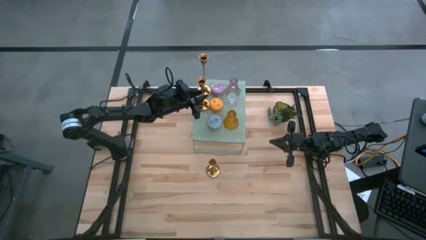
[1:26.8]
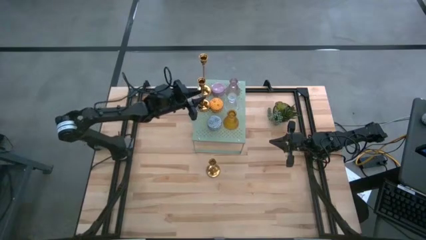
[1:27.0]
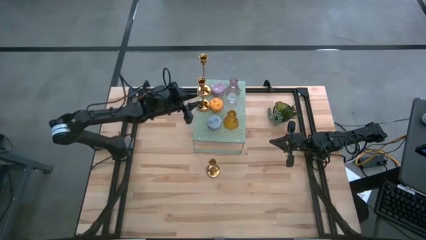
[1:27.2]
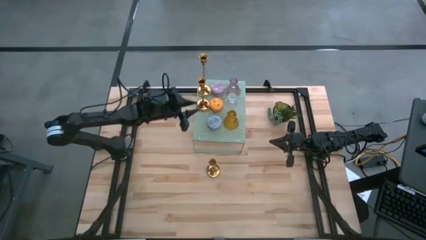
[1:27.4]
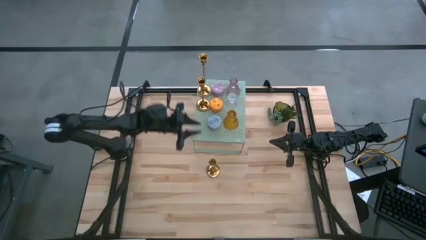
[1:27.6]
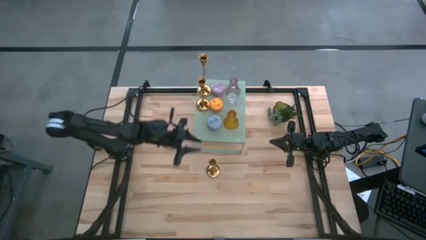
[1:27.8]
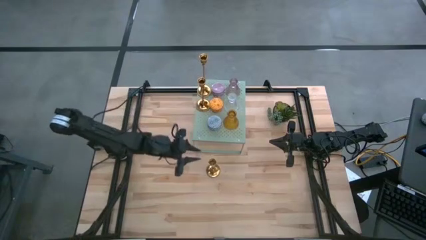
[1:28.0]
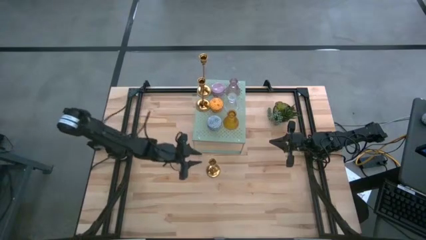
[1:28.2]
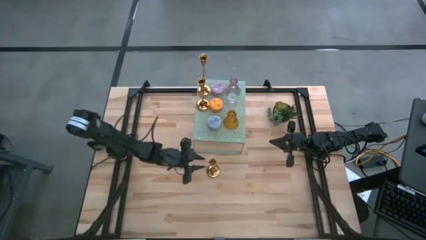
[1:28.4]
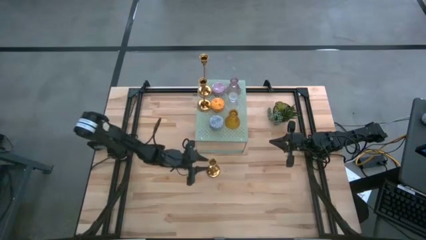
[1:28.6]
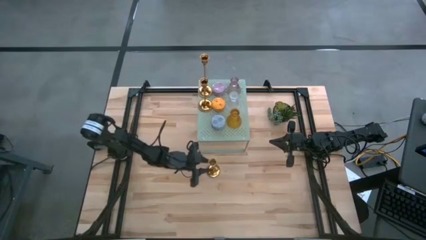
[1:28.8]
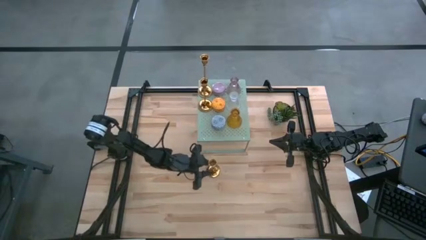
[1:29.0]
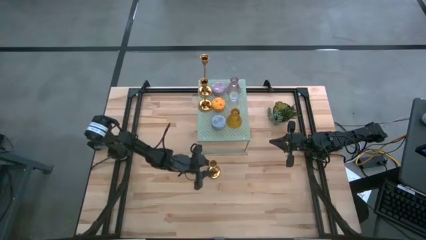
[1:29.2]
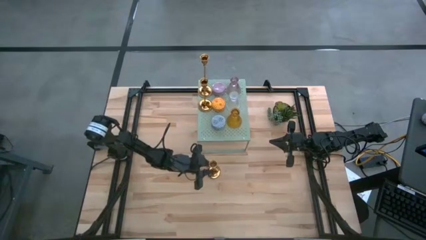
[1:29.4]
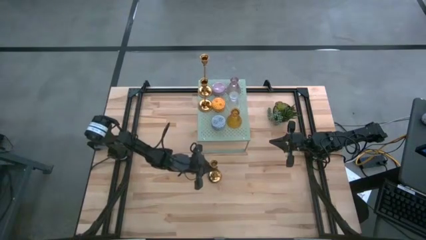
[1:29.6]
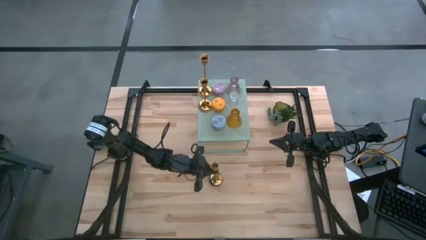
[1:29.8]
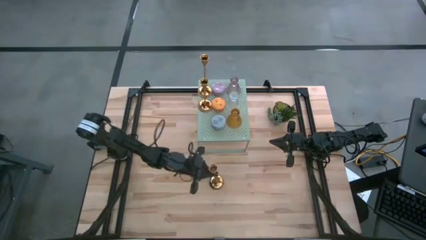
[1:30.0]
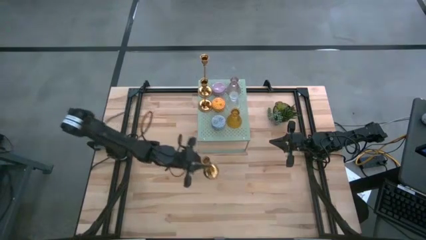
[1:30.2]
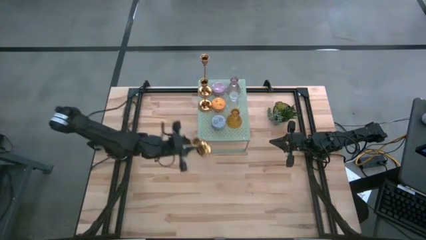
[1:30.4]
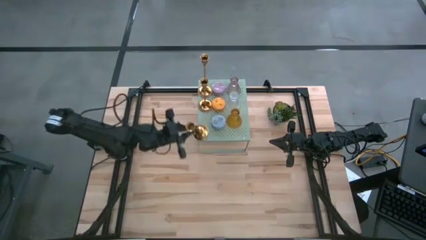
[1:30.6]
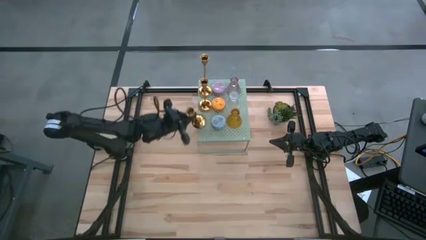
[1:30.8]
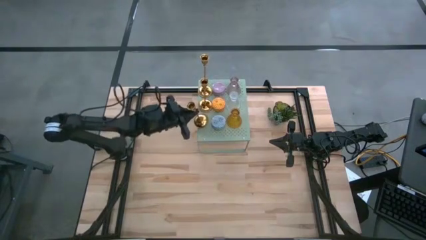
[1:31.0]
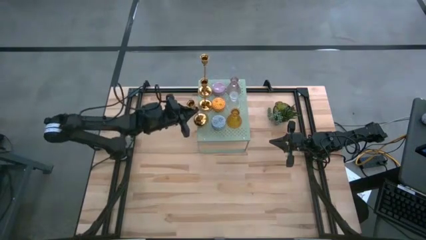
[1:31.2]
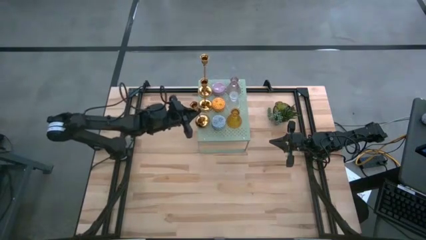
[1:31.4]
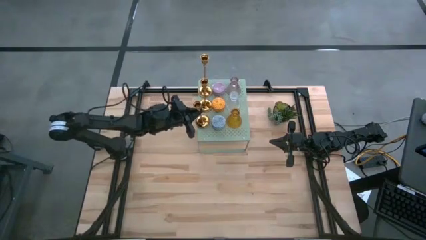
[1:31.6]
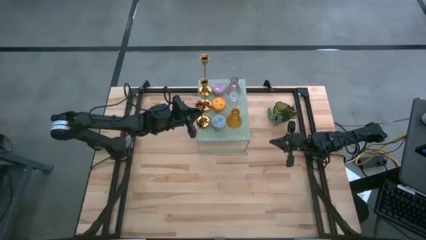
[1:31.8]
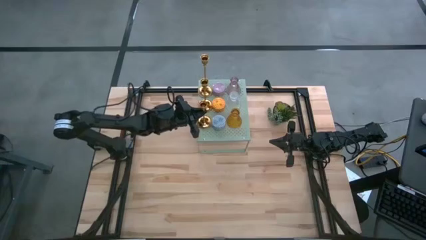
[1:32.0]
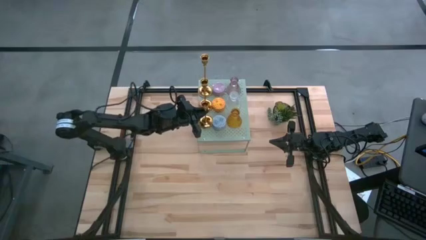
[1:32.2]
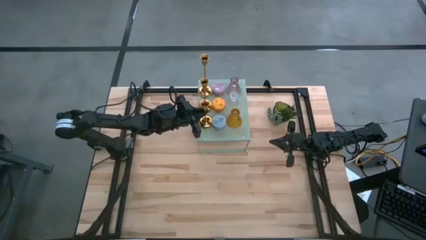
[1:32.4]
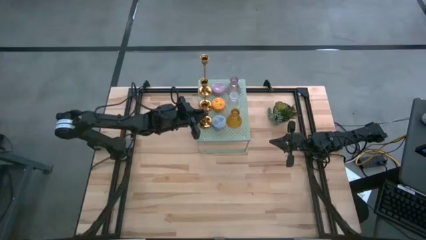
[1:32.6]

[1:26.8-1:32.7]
Task: Stock candles on shelf
Put the gold candle holder and aligned it with the other gold candle holder on the shelf

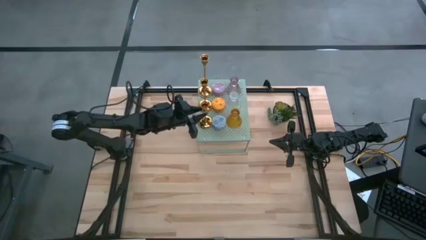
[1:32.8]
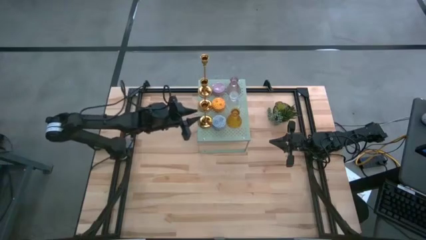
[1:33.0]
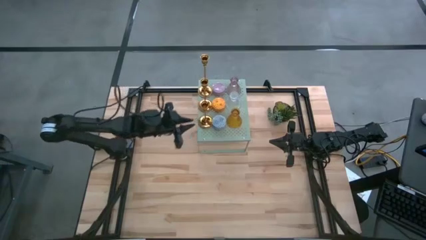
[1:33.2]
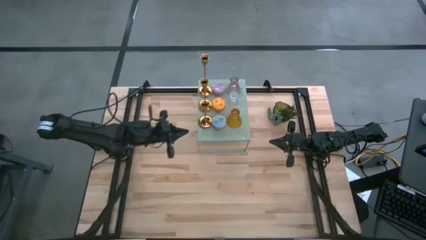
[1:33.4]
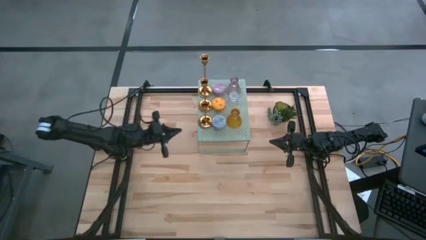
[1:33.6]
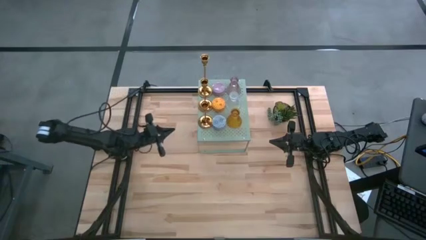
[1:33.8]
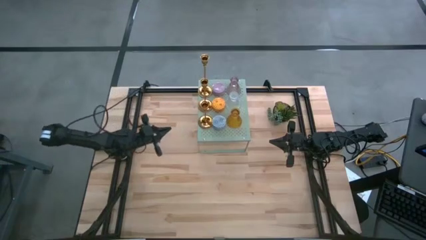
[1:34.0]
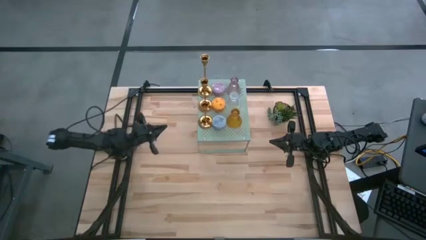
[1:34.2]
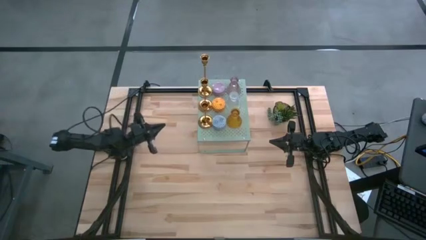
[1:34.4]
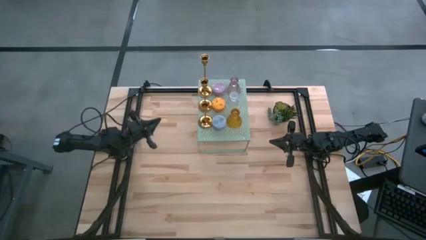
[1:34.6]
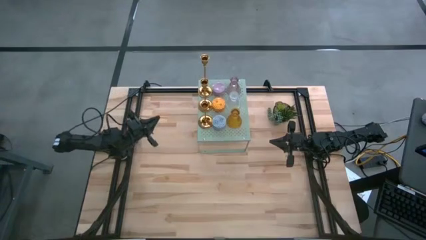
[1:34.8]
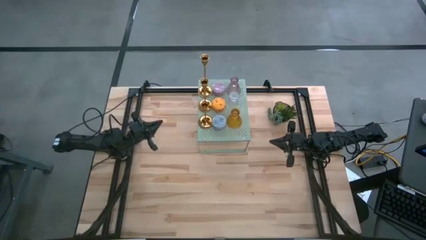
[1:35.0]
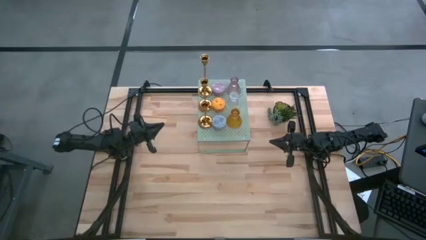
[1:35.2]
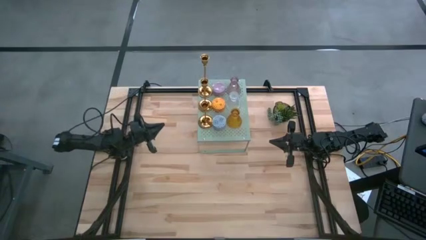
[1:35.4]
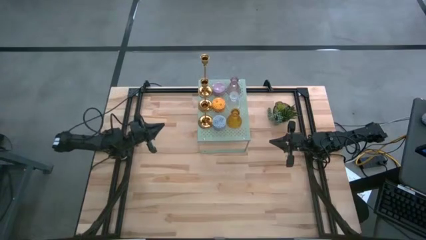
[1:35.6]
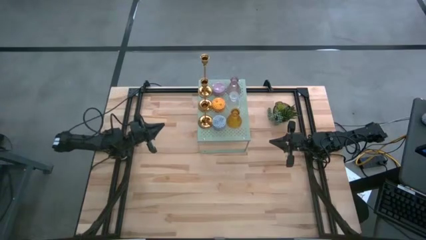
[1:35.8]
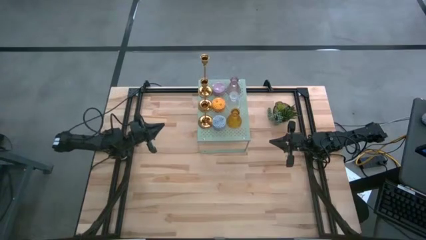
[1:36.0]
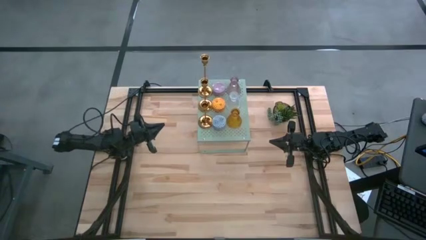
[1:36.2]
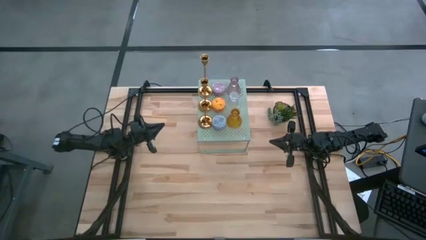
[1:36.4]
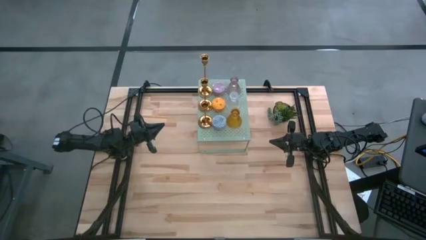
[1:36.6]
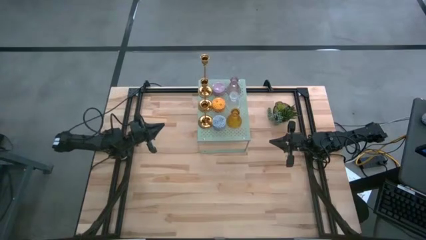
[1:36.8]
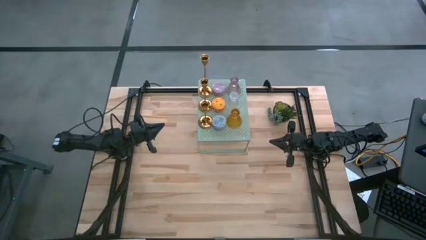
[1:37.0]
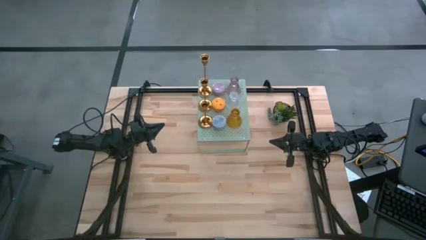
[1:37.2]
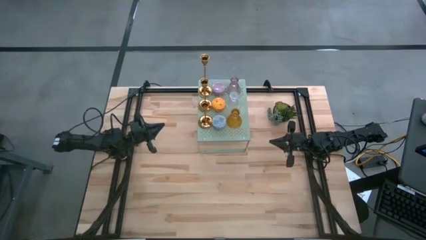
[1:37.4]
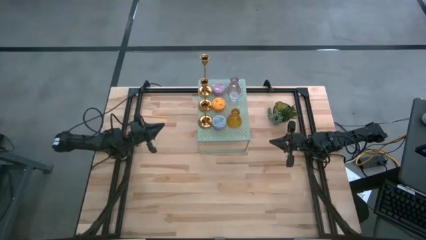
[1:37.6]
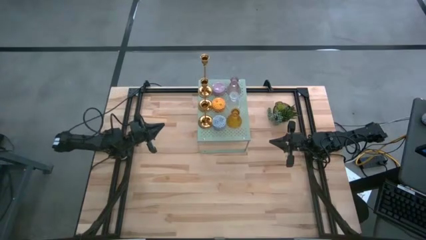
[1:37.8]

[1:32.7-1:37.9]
Return to Home Position
